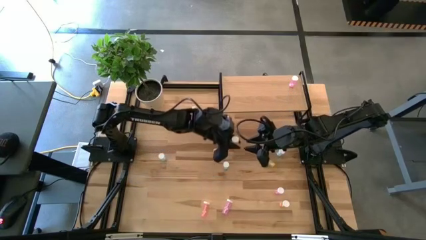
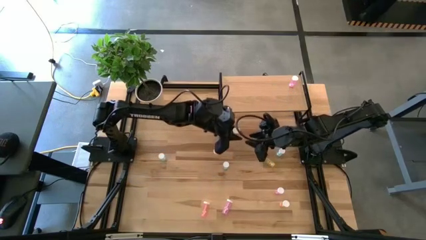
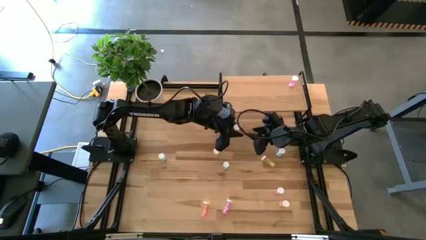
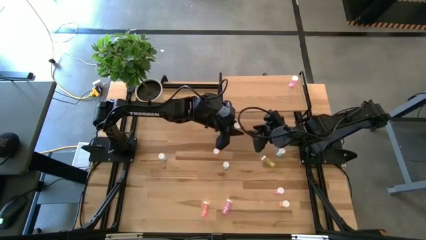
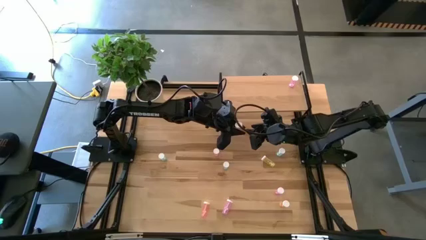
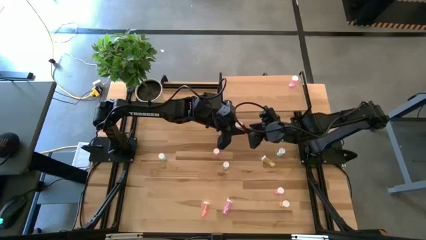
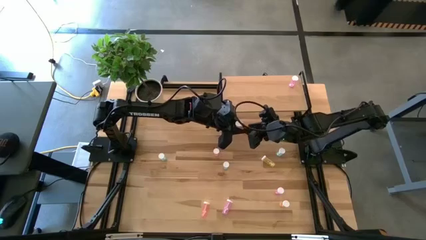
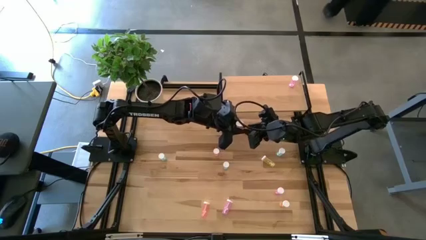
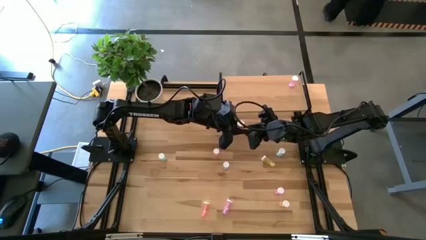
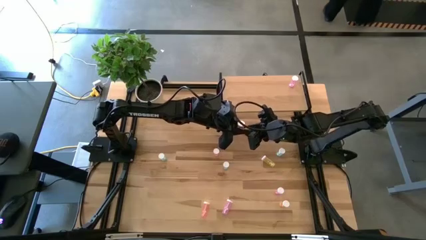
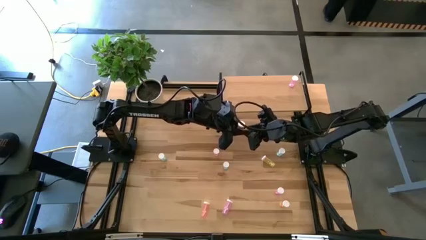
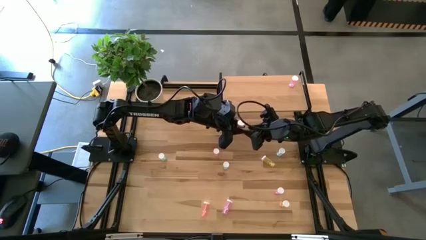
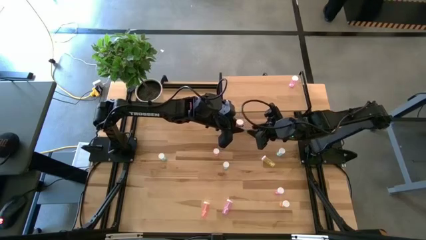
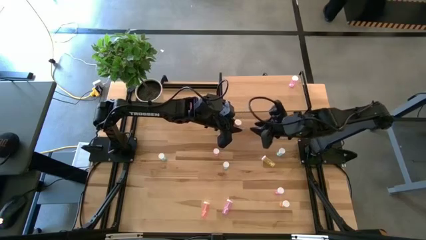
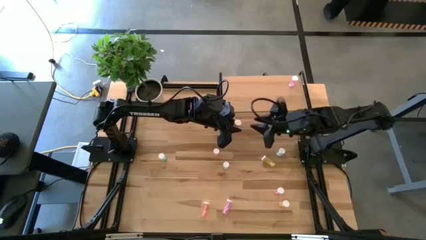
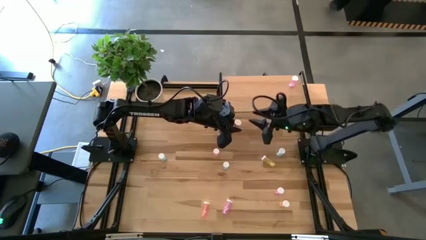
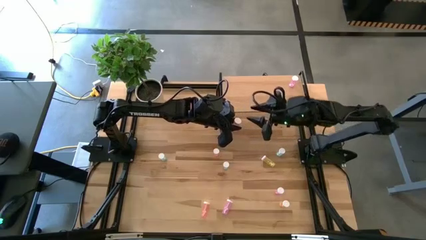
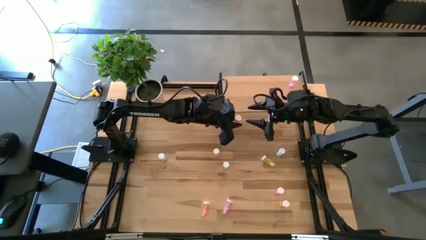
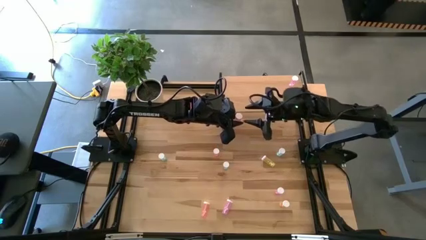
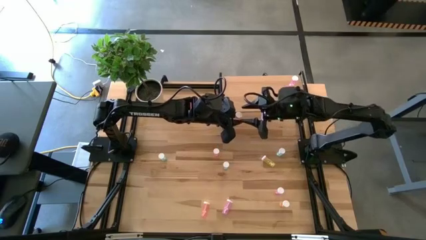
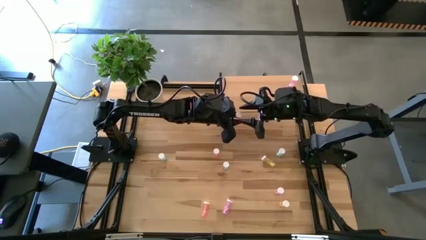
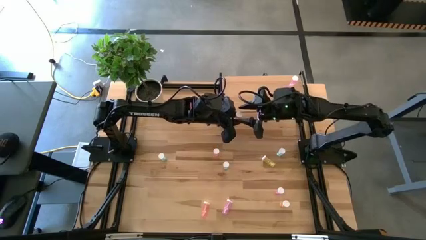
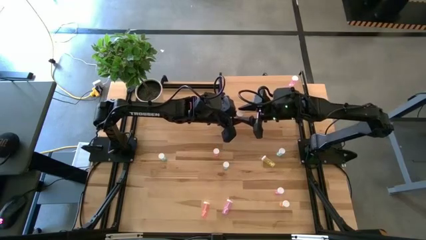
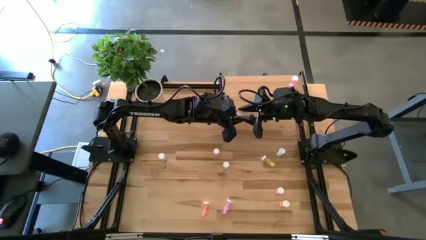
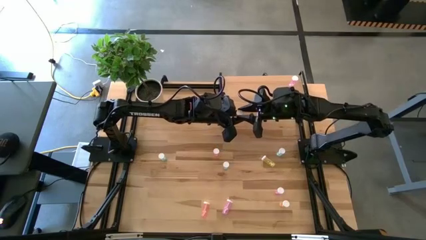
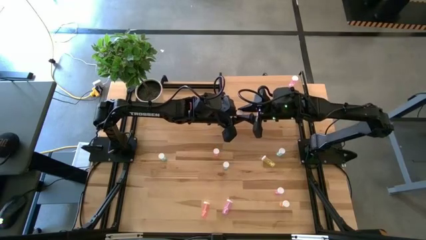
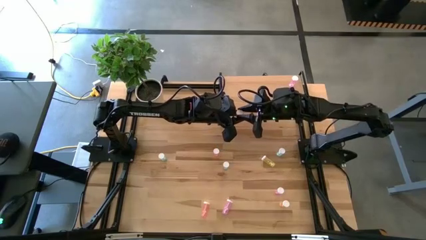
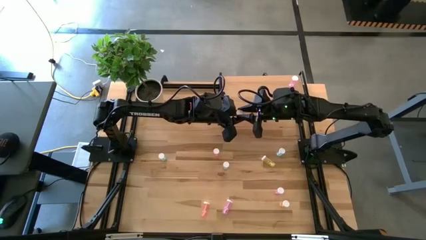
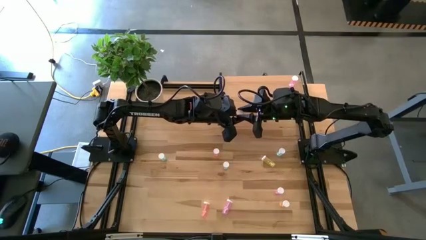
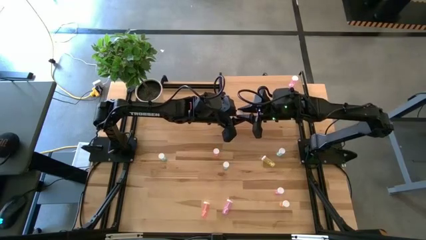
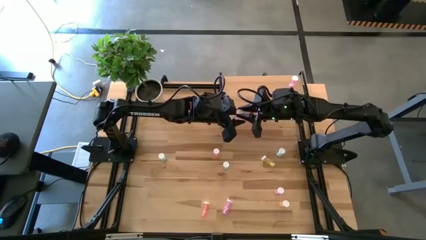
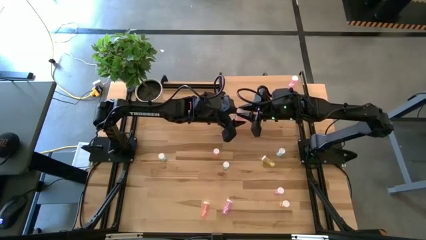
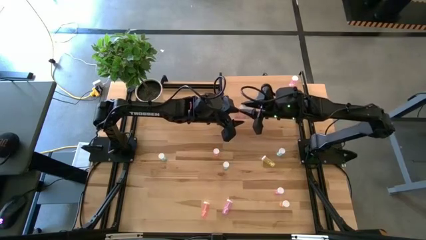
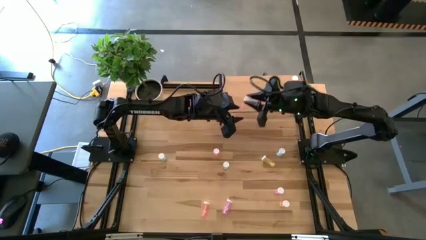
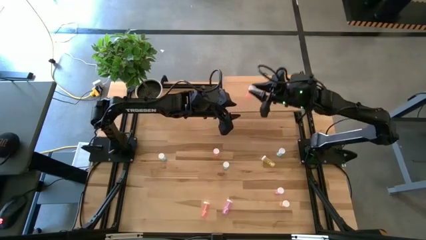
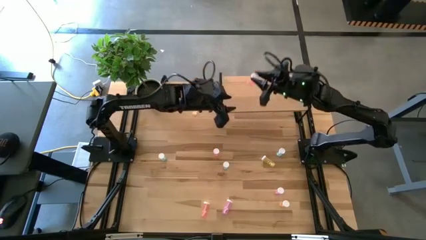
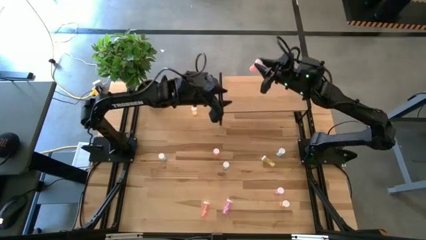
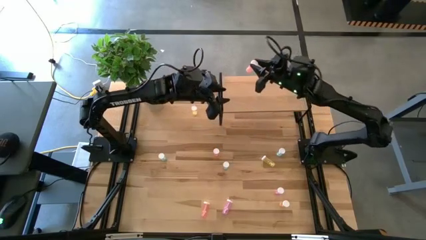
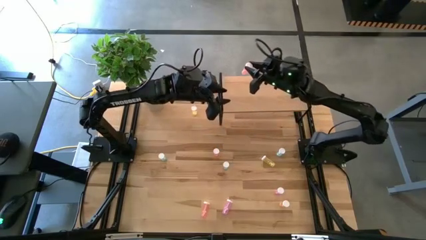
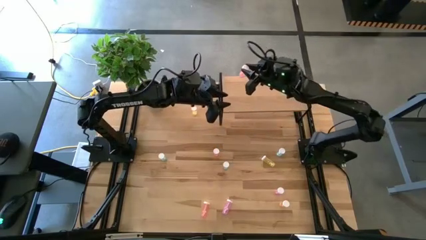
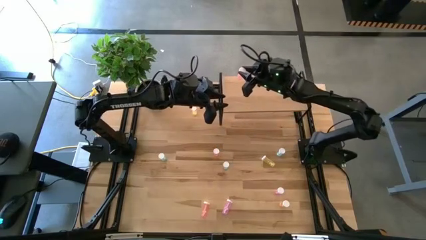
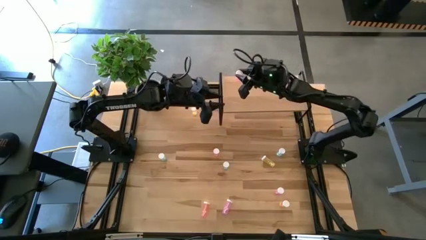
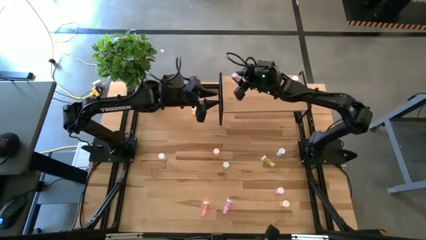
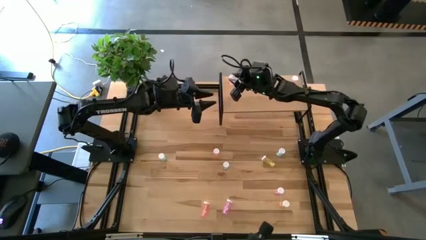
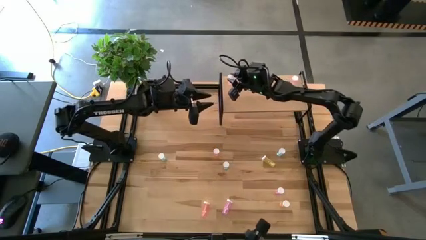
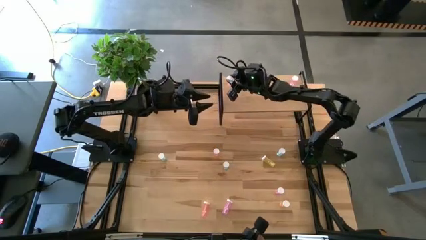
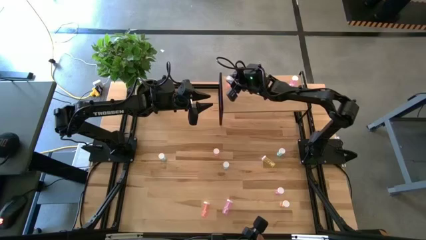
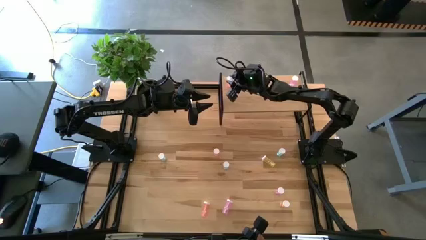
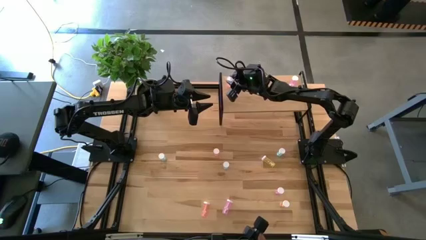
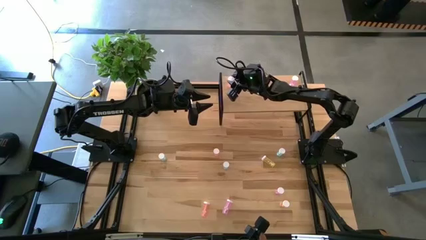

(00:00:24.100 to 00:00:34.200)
Task: Pick and place medicine bottles onto shelf by color
Put the bottom left pink pill bottle on the shelf

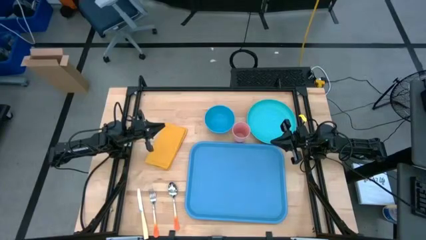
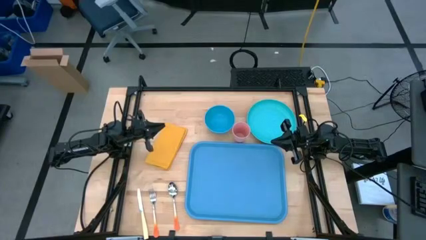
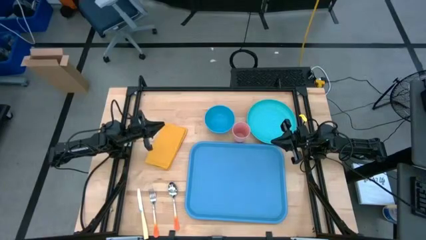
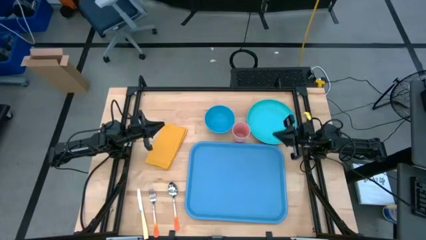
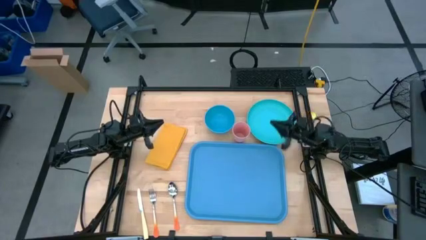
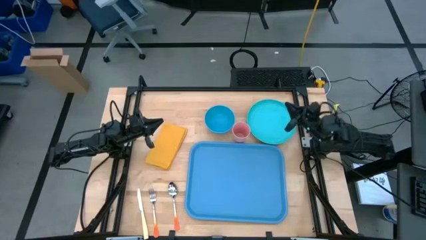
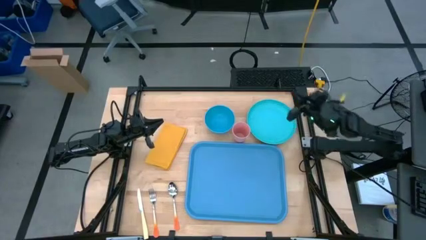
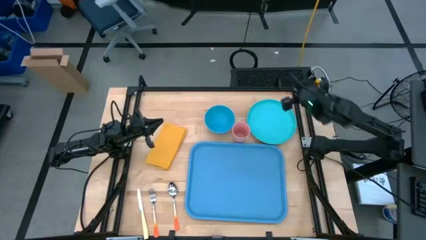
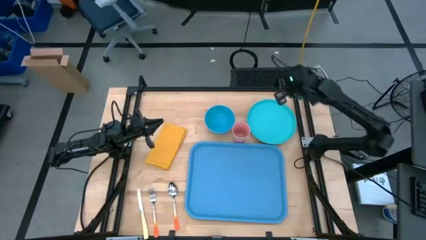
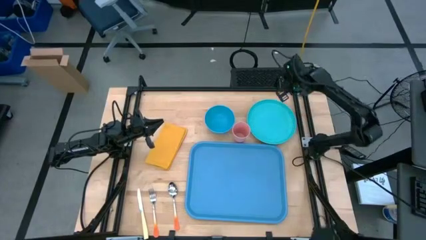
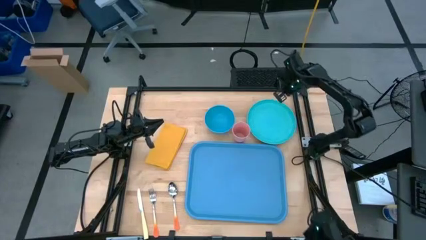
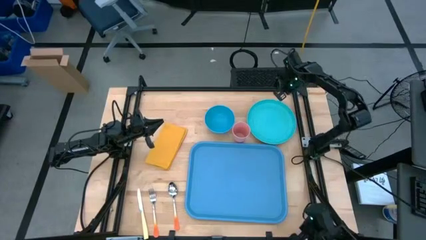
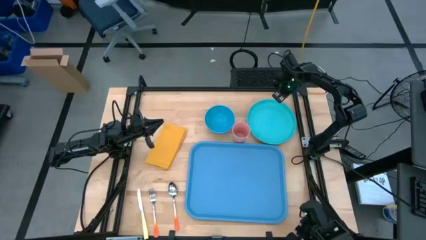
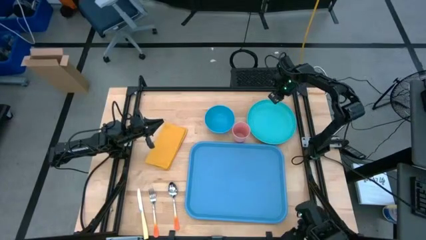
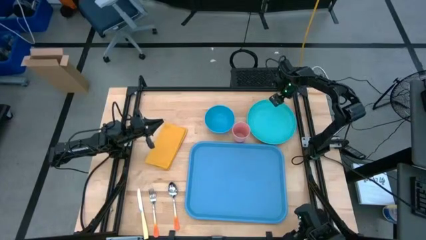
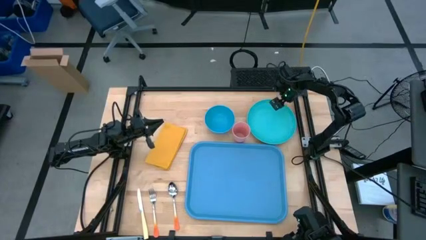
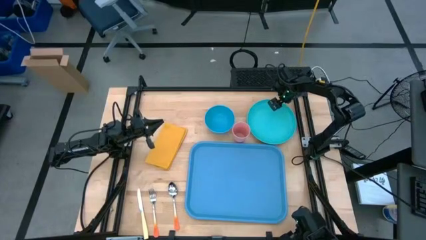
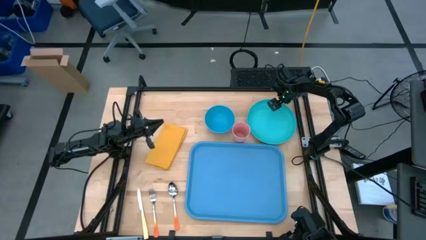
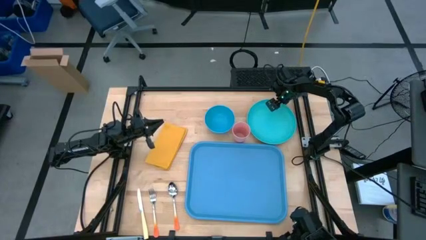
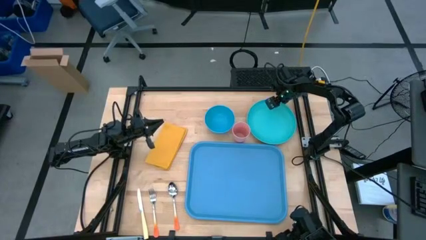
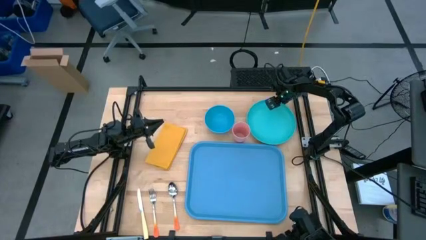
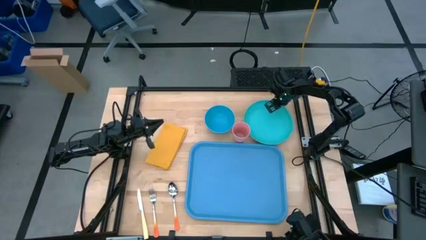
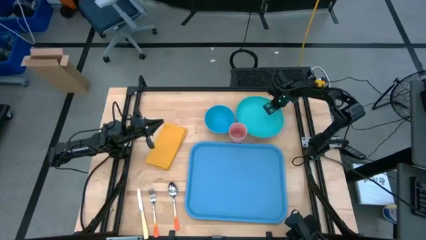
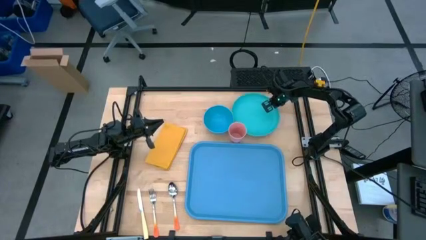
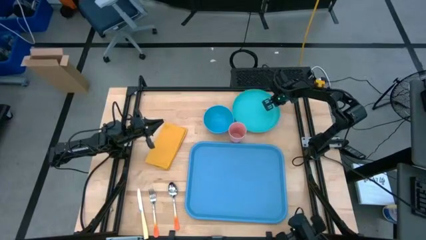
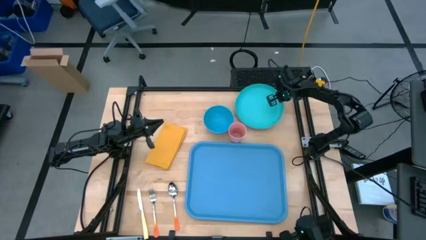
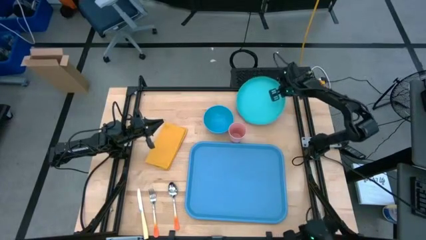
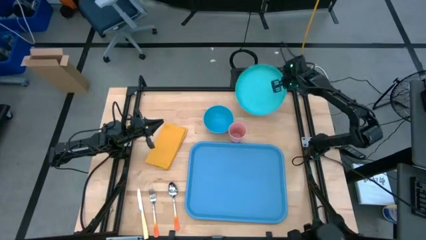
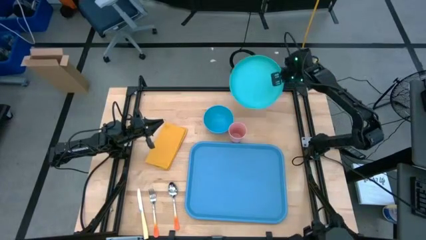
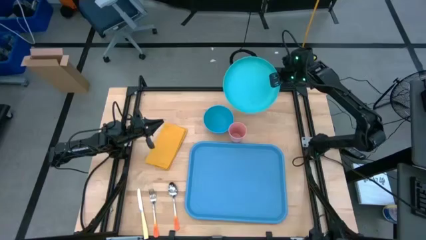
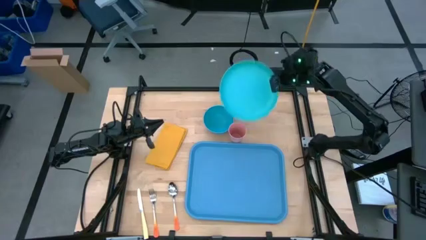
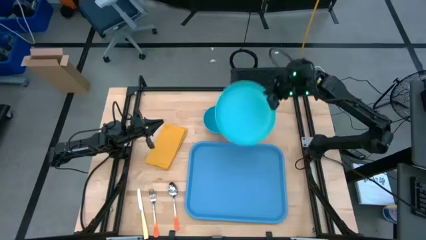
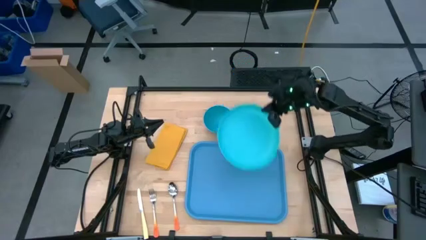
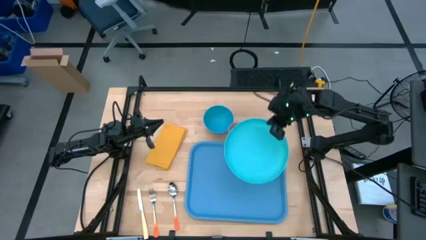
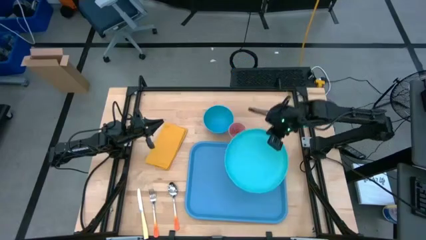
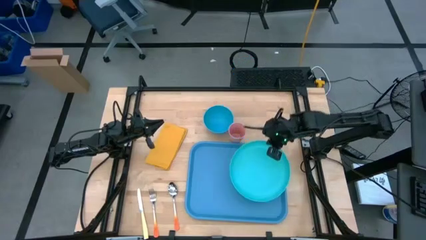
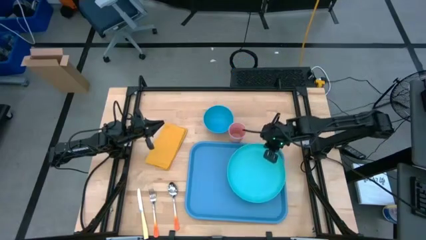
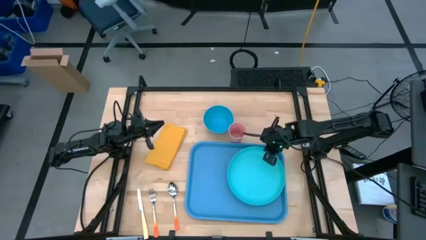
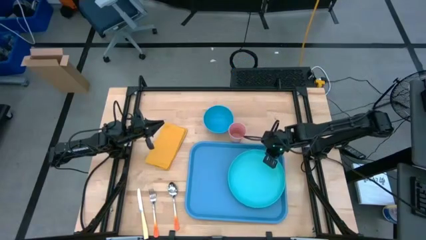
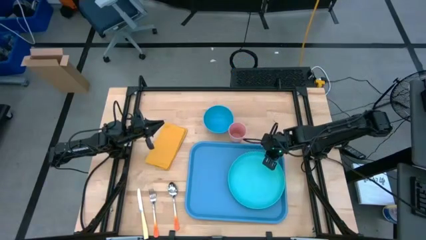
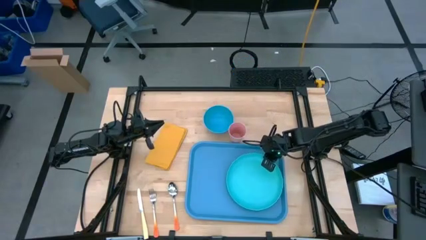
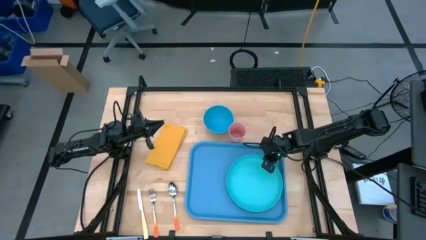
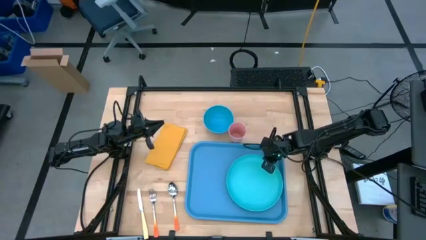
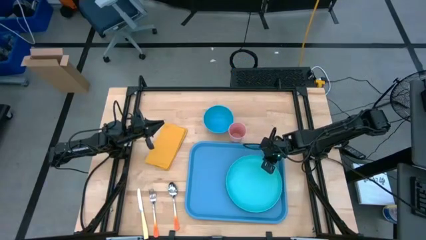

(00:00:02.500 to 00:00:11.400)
Task: Set up tray
Put the light blue plate on the blue tray
